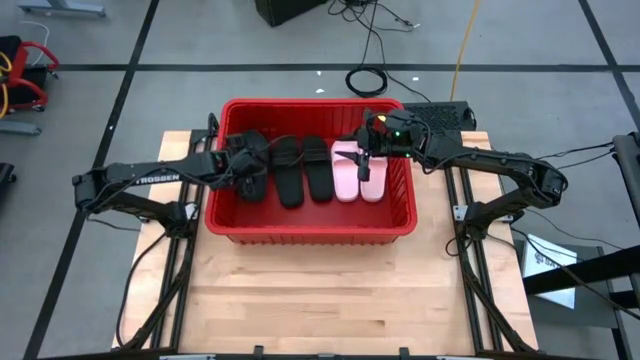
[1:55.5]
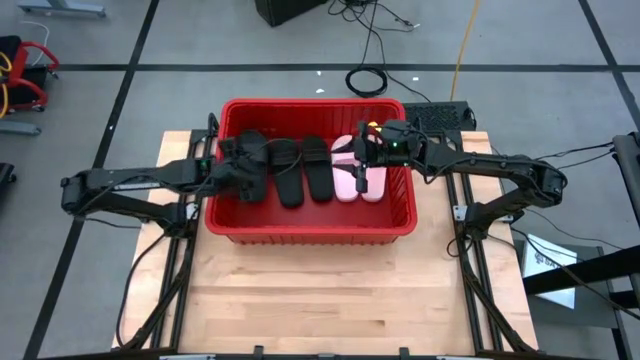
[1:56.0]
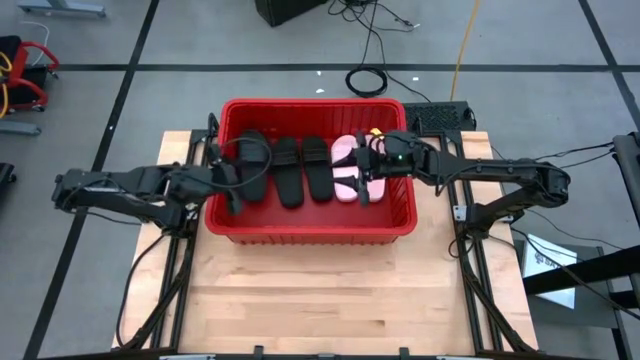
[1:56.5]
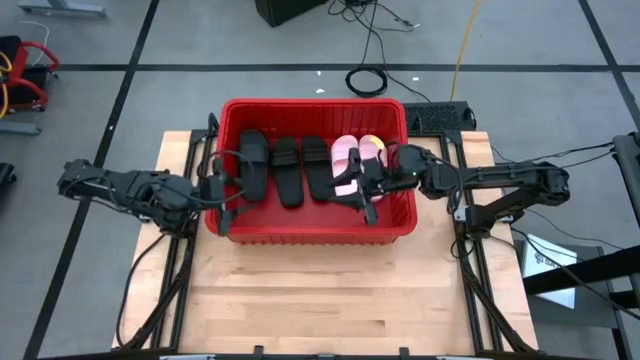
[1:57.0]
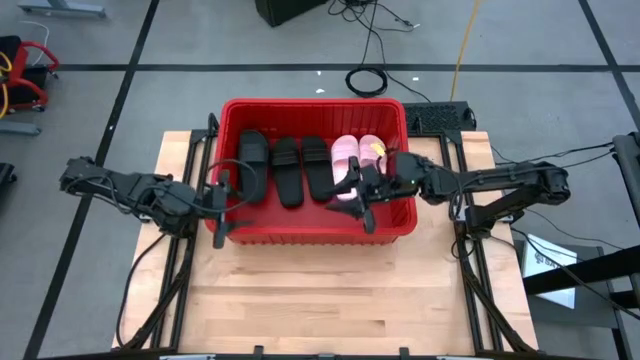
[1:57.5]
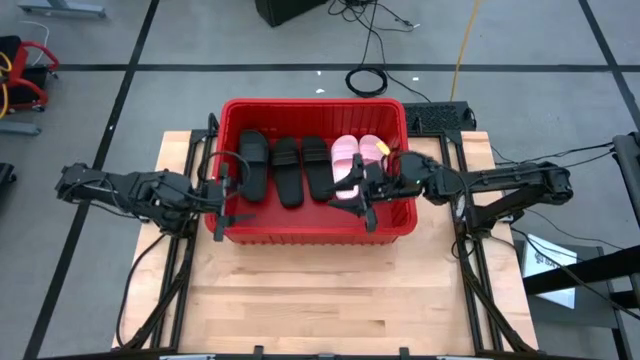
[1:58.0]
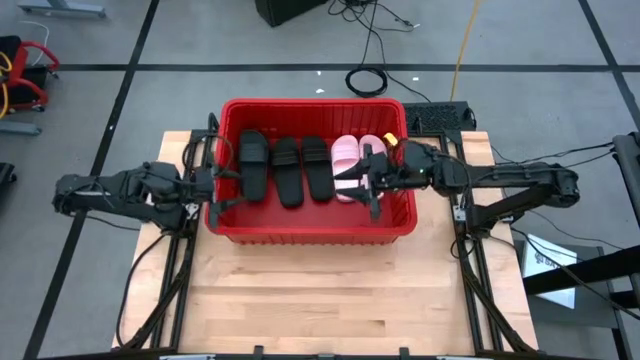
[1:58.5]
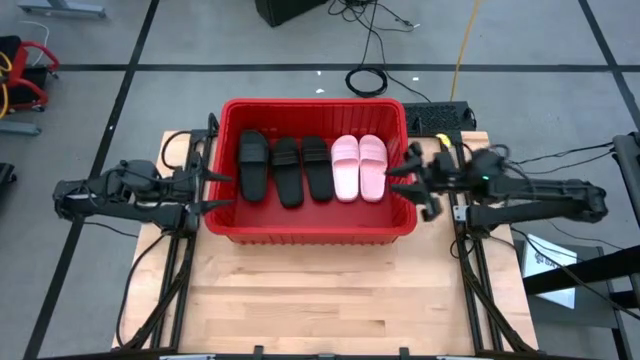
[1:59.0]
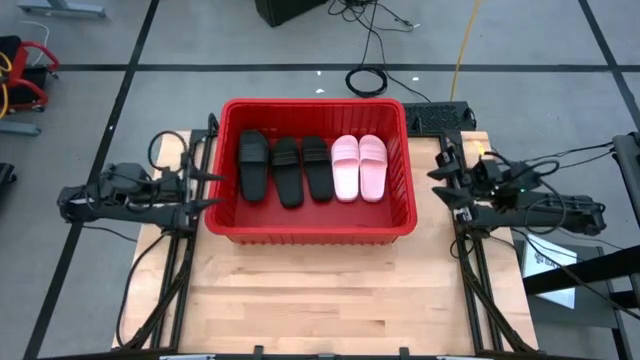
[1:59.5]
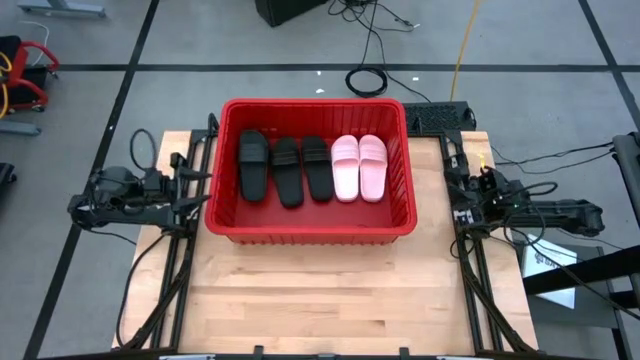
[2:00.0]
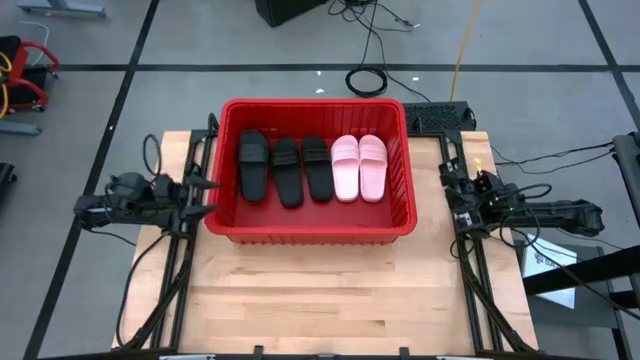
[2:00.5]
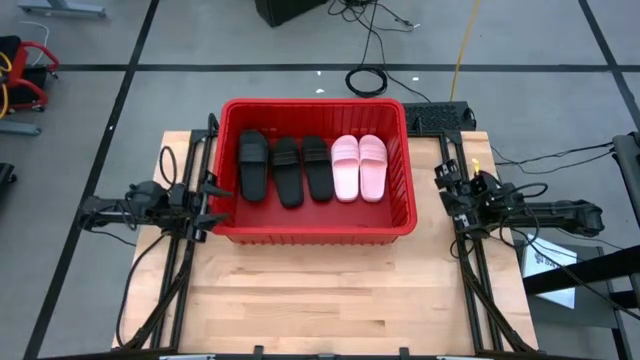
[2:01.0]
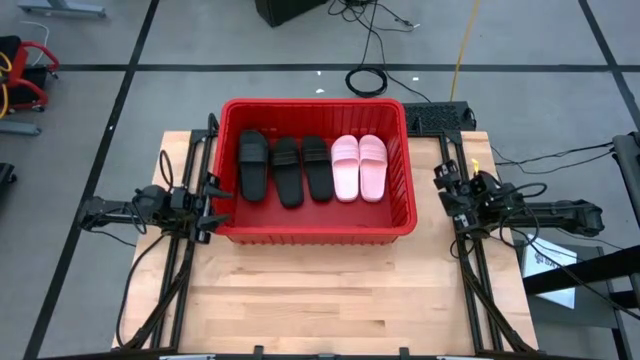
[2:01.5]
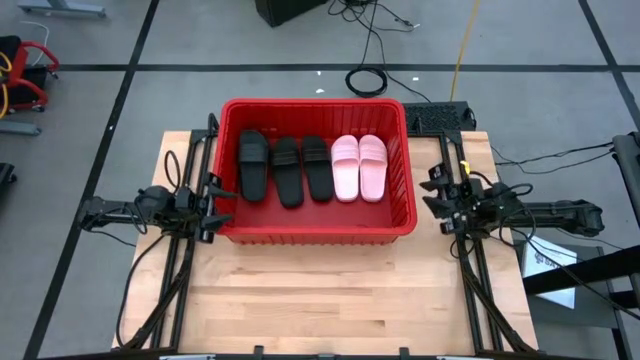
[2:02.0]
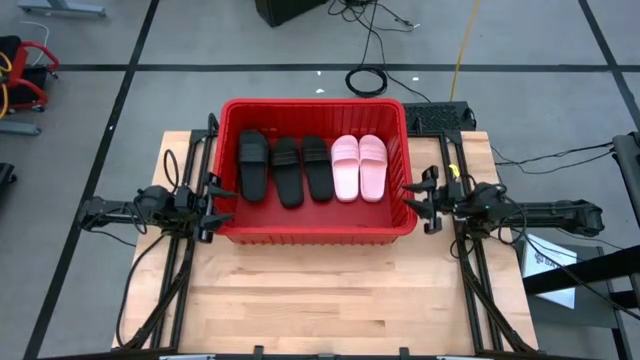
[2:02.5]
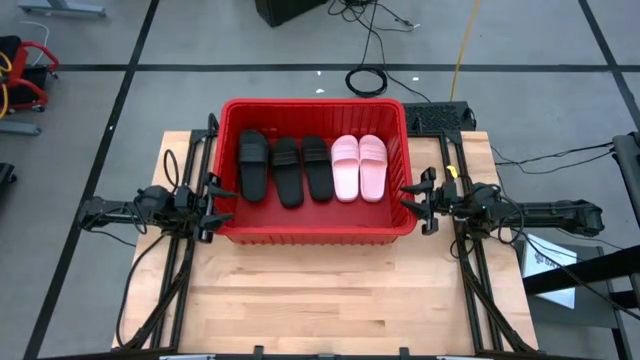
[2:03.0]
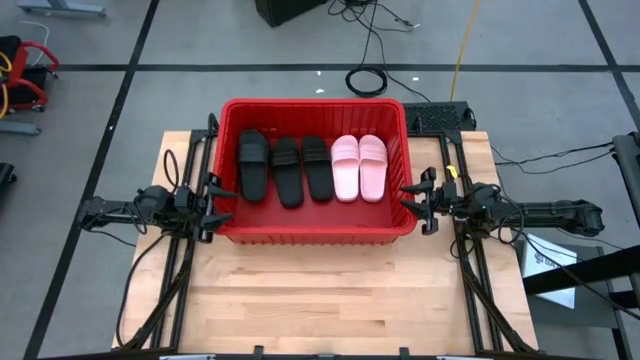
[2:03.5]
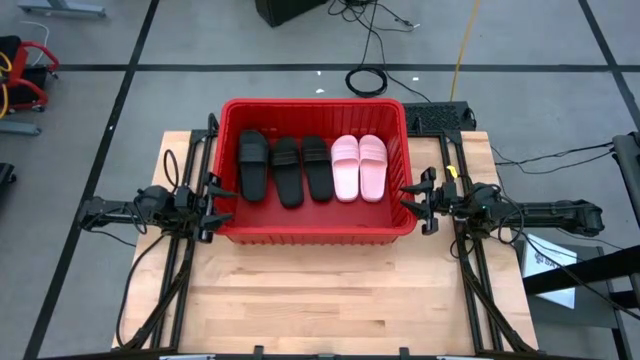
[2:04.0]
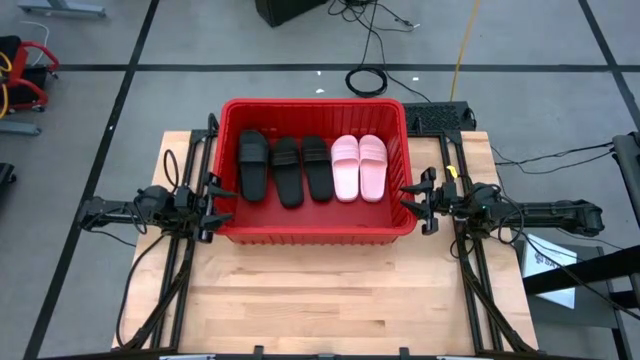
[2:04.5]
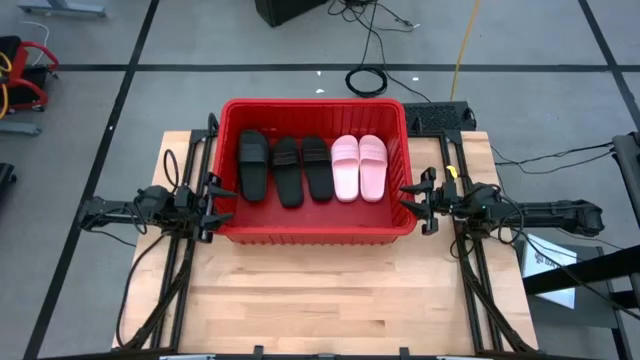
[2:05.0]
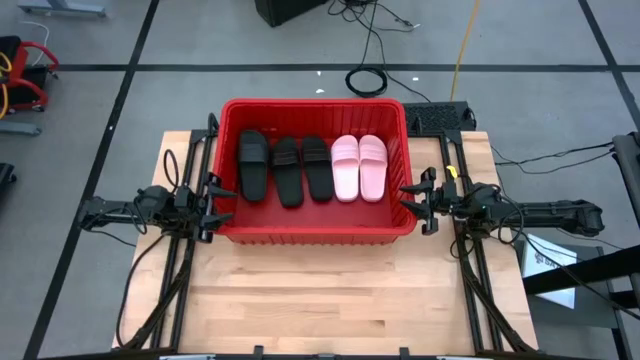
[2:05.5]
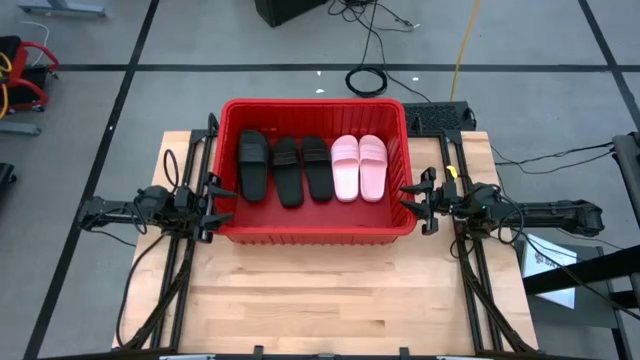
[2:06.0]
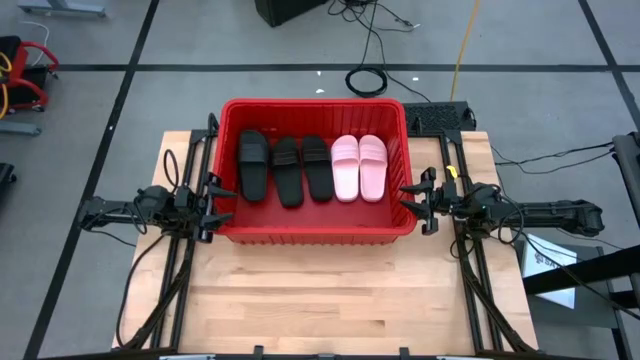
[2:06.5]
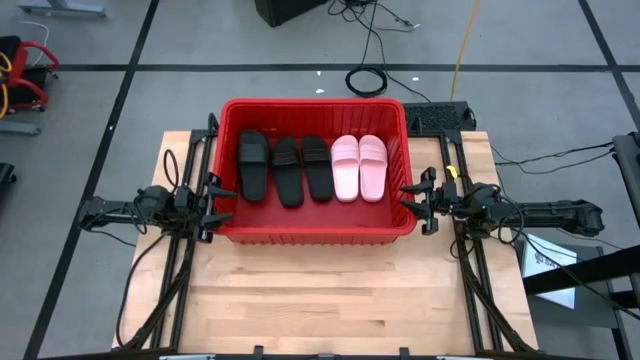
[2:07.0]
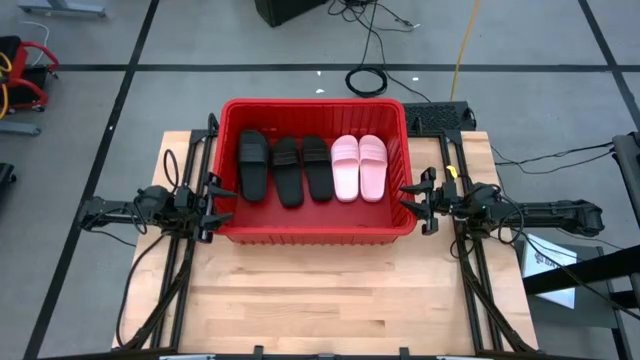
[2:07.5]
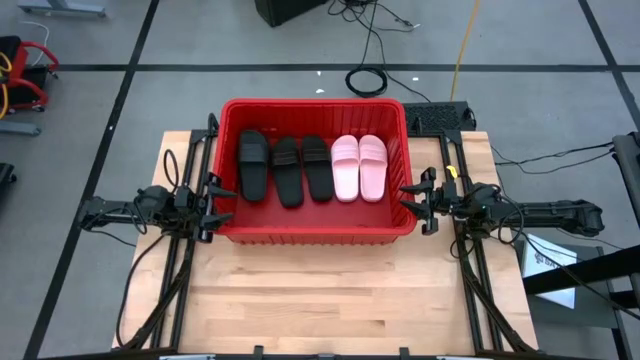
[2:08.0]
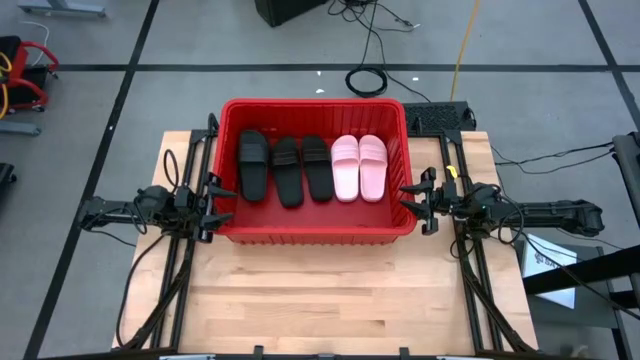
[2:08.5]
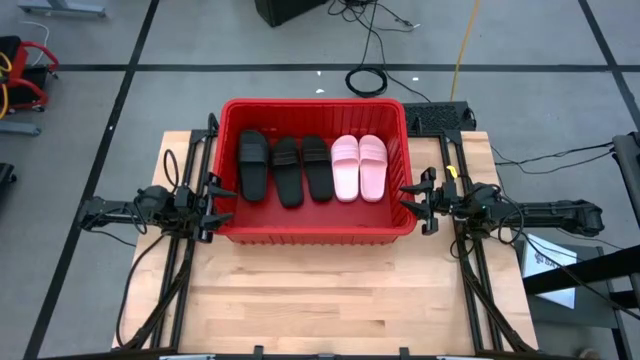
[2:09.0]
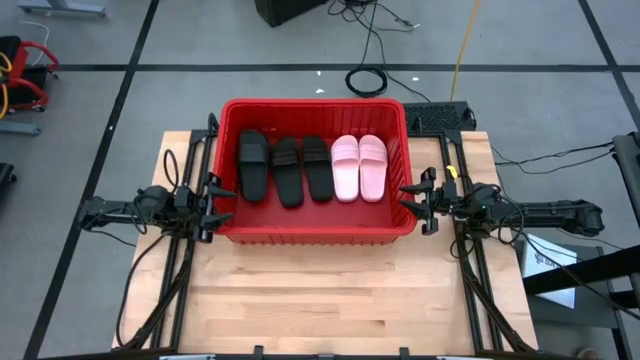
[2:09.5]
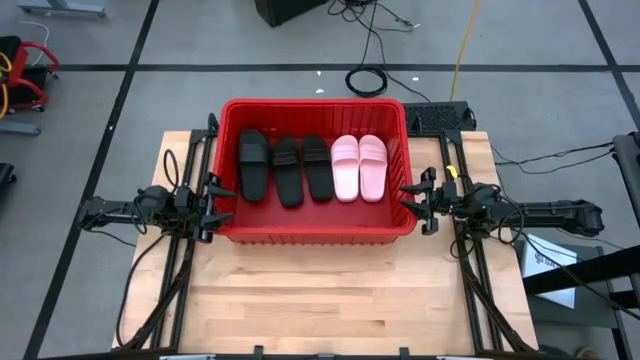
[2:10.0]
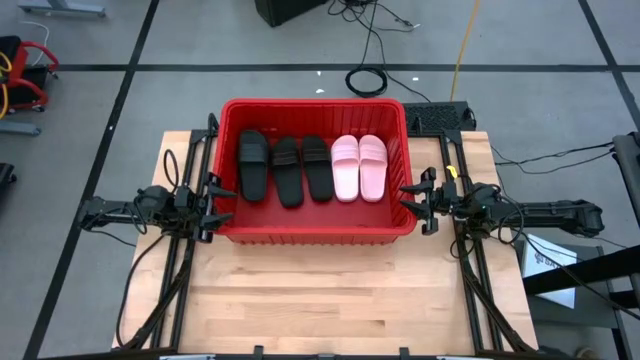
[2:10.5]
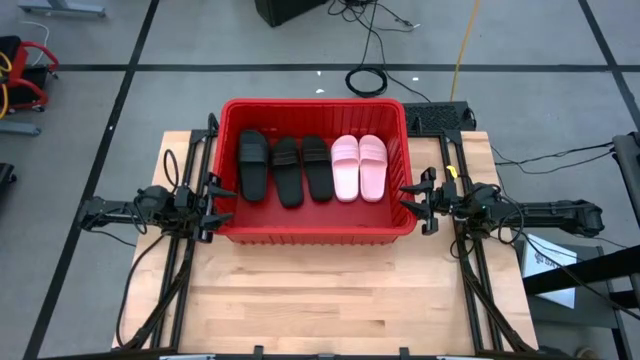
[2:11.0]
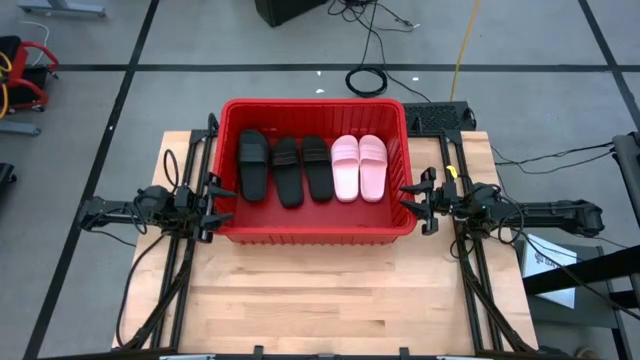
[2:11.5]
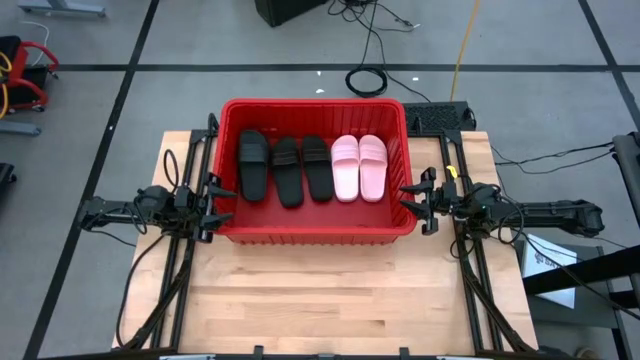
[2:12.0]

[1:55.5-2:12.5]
Task: Pick and place slides into bin
Return to Home Position
